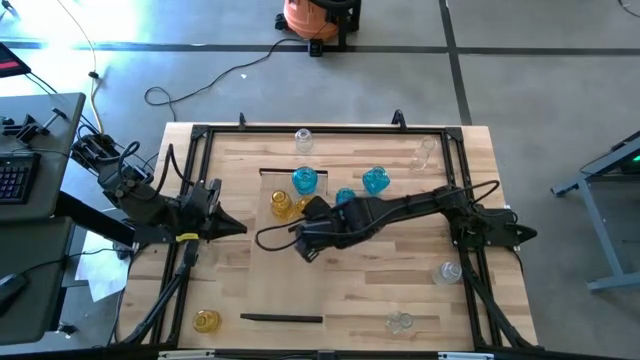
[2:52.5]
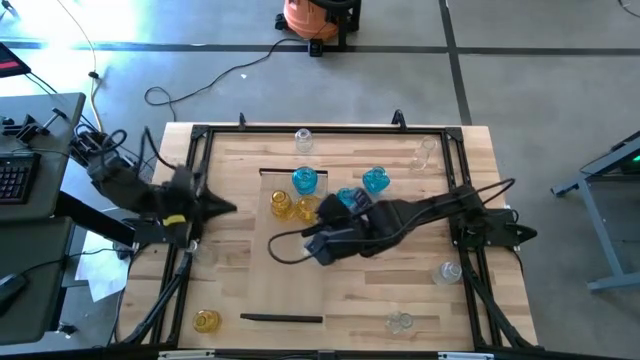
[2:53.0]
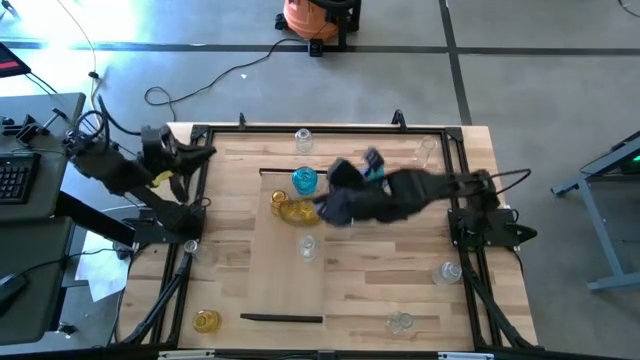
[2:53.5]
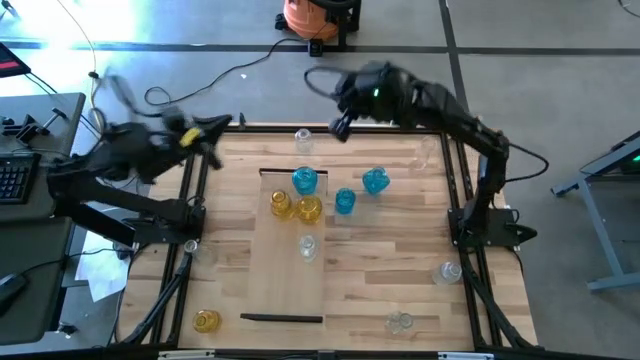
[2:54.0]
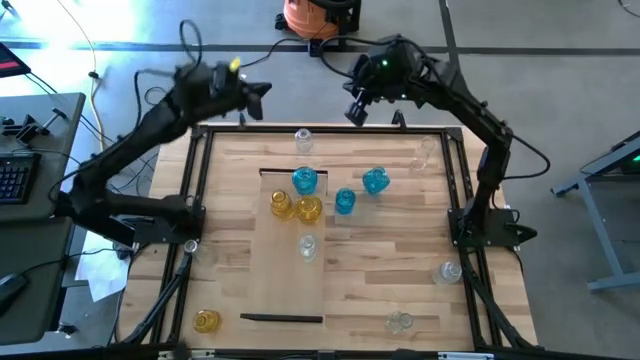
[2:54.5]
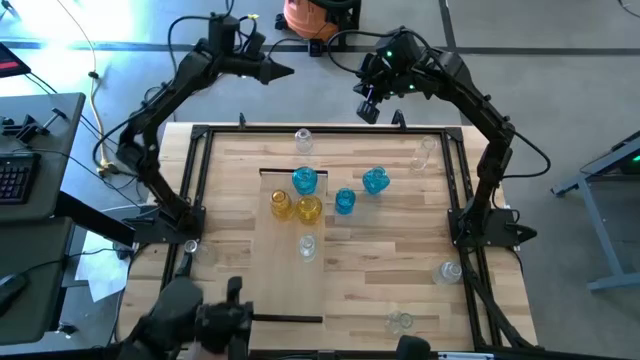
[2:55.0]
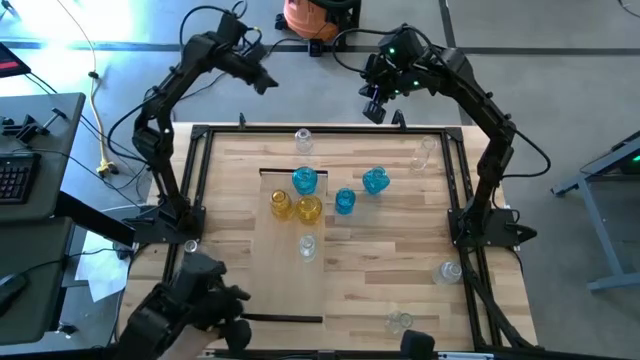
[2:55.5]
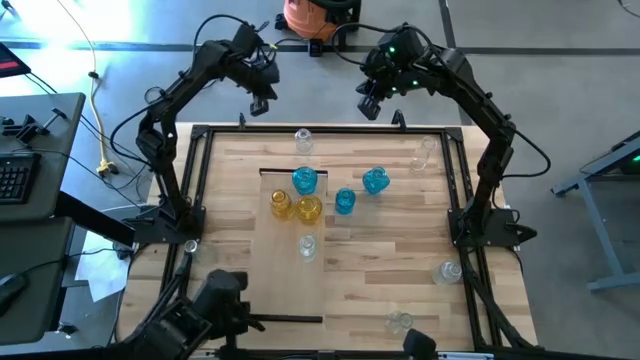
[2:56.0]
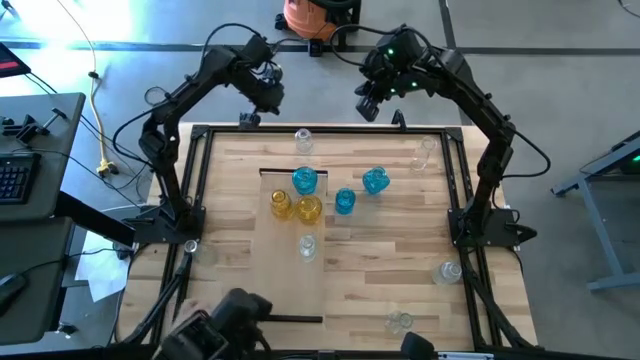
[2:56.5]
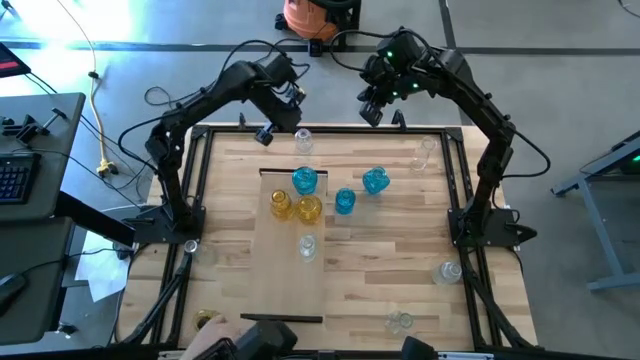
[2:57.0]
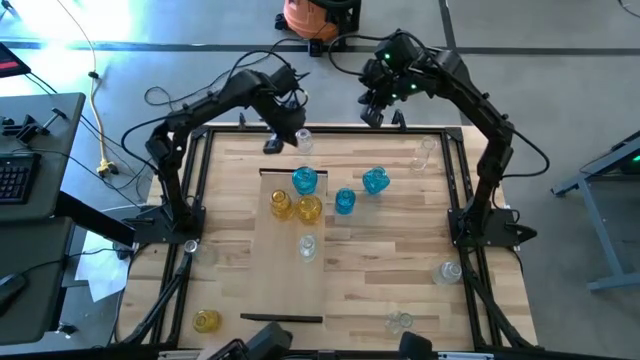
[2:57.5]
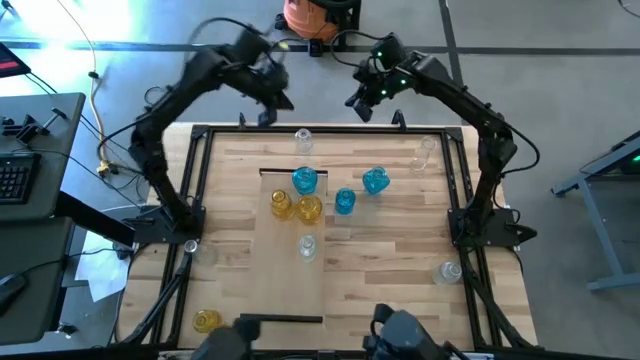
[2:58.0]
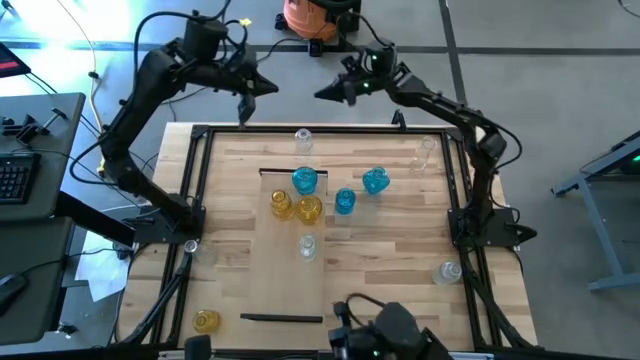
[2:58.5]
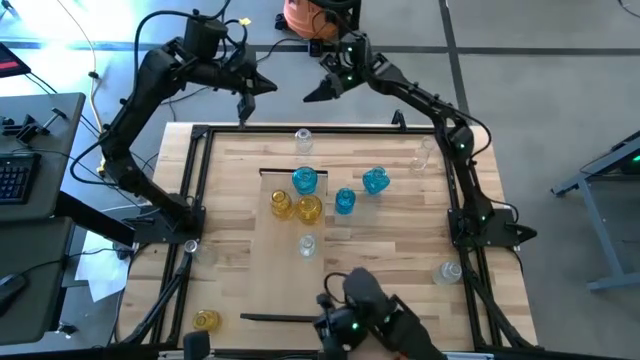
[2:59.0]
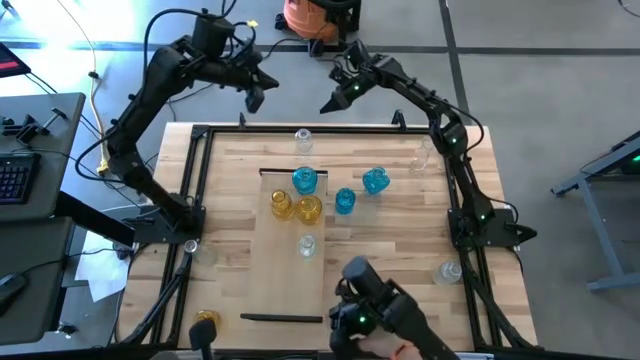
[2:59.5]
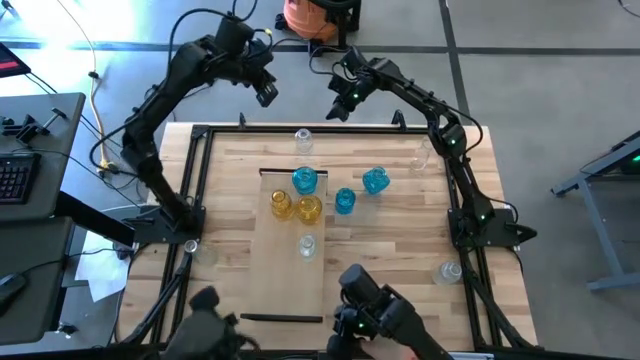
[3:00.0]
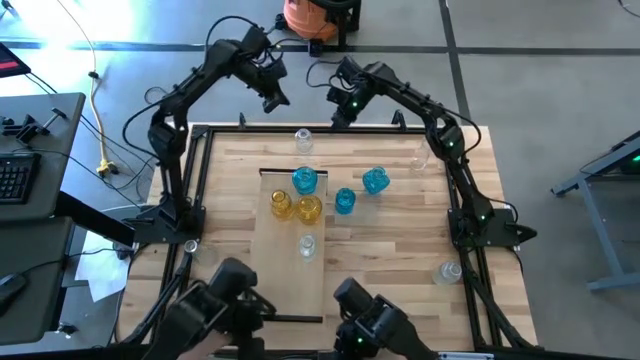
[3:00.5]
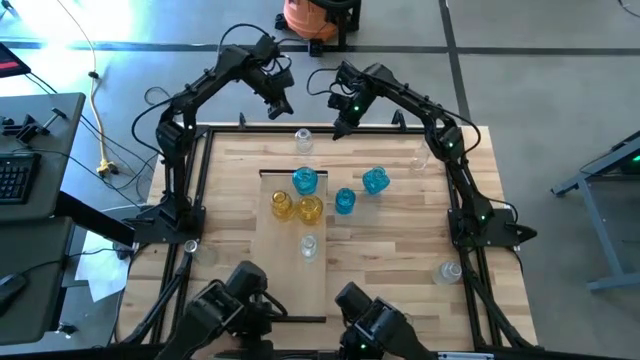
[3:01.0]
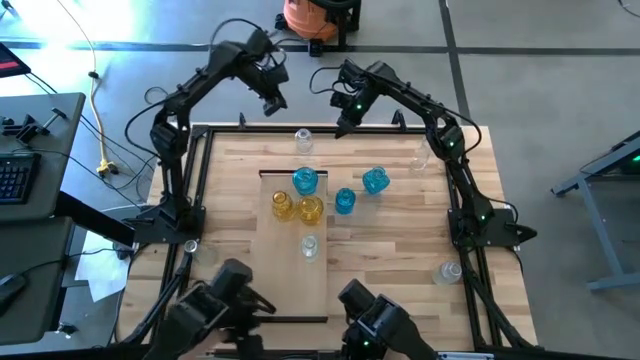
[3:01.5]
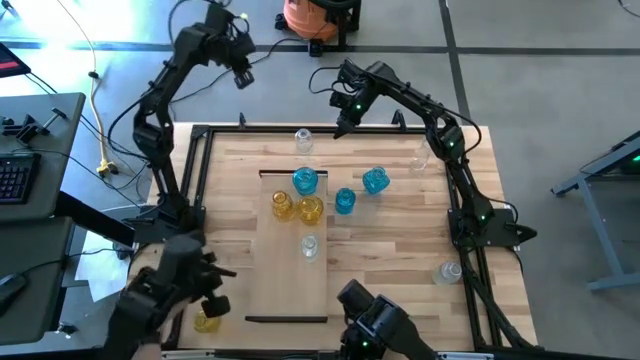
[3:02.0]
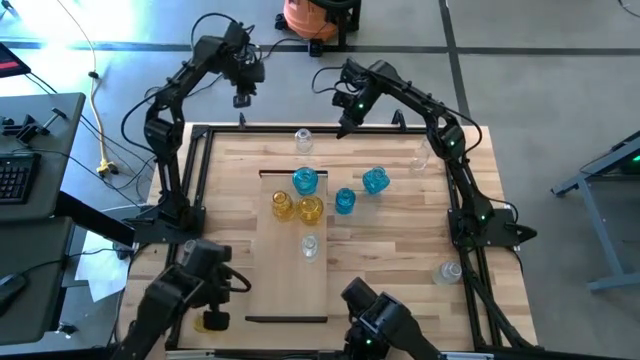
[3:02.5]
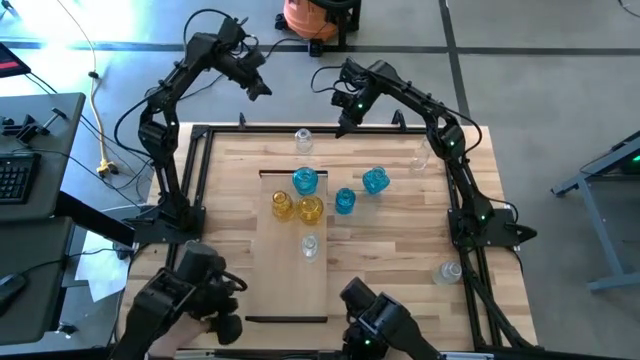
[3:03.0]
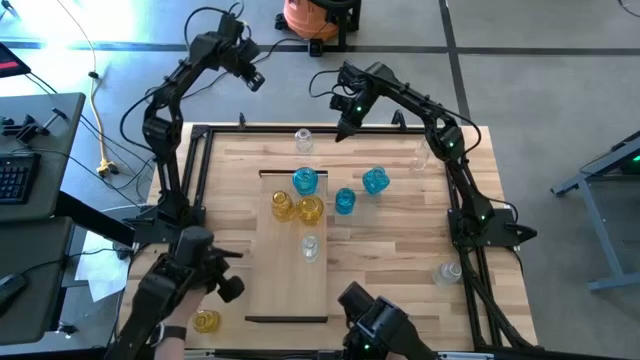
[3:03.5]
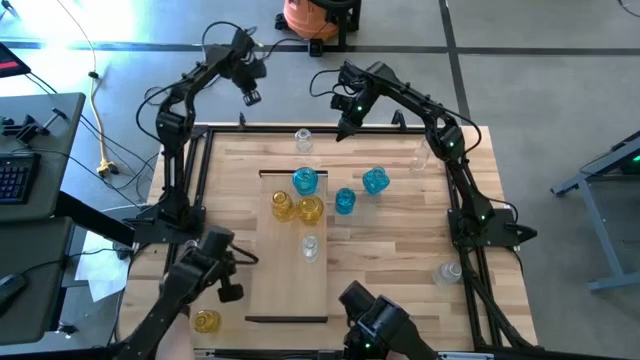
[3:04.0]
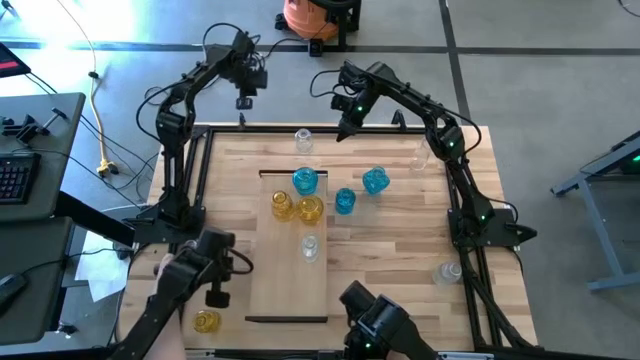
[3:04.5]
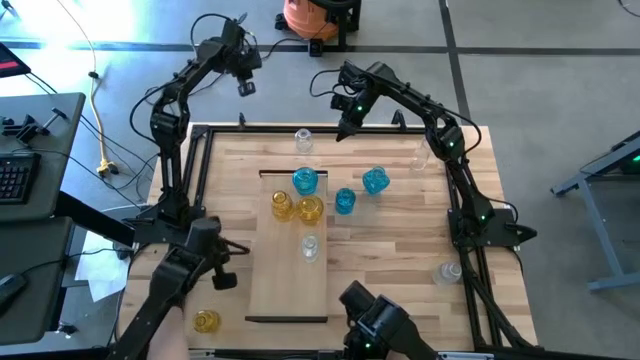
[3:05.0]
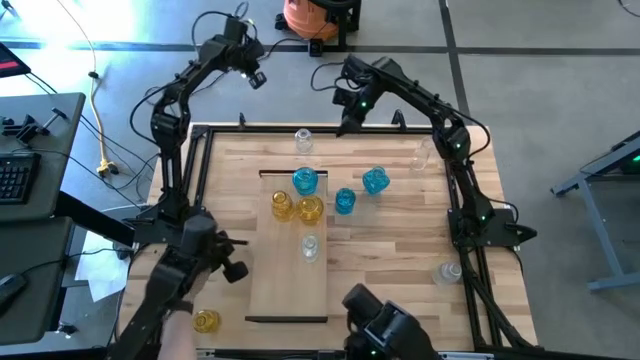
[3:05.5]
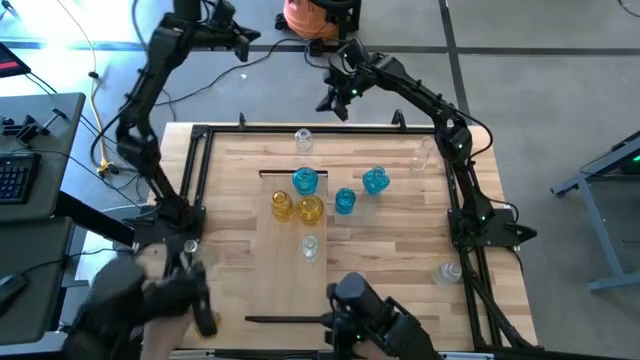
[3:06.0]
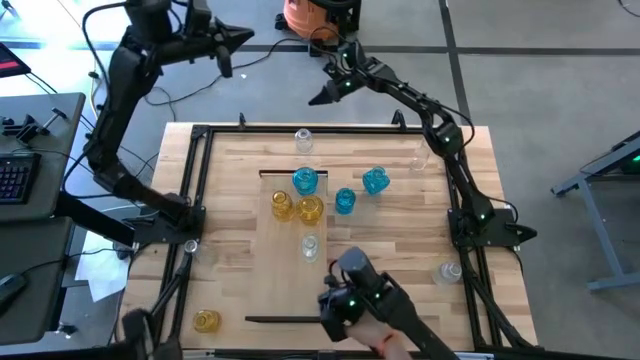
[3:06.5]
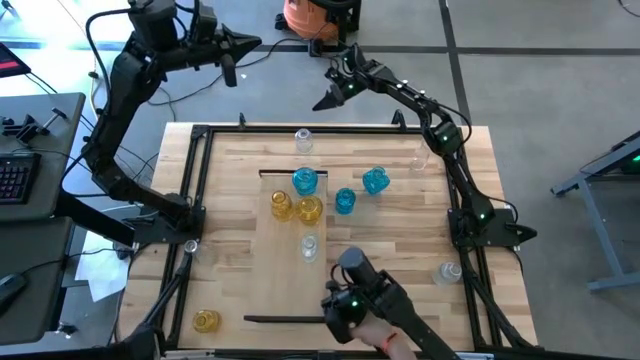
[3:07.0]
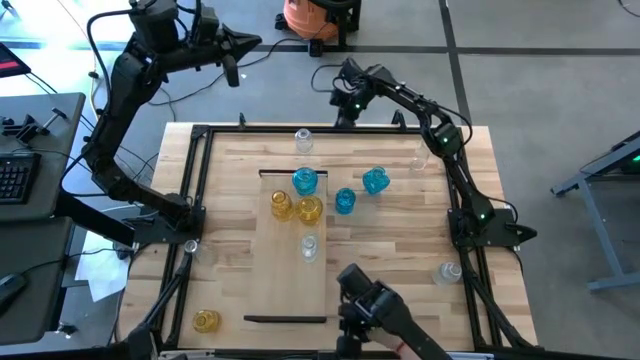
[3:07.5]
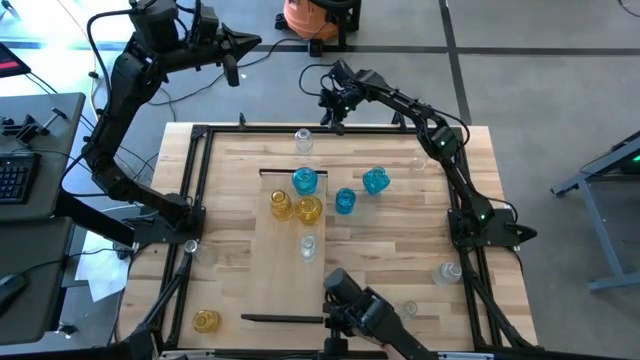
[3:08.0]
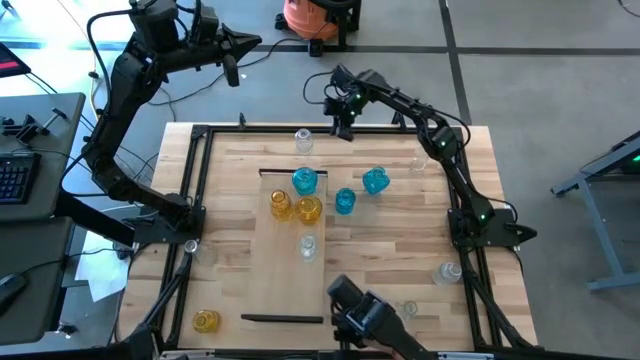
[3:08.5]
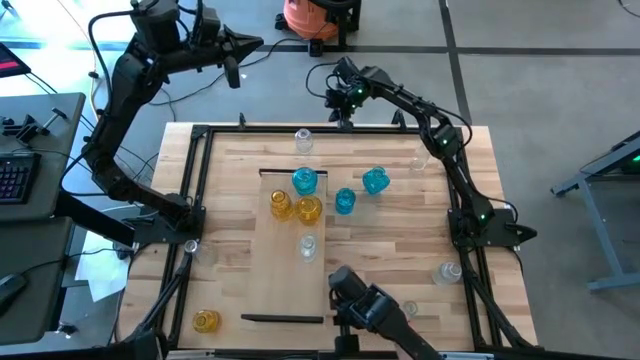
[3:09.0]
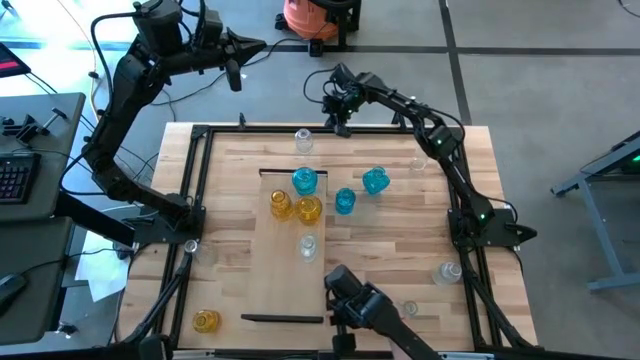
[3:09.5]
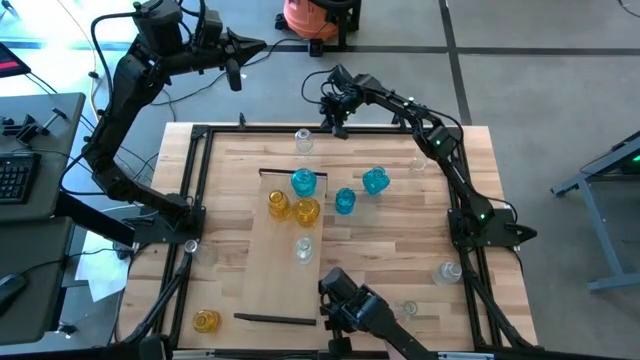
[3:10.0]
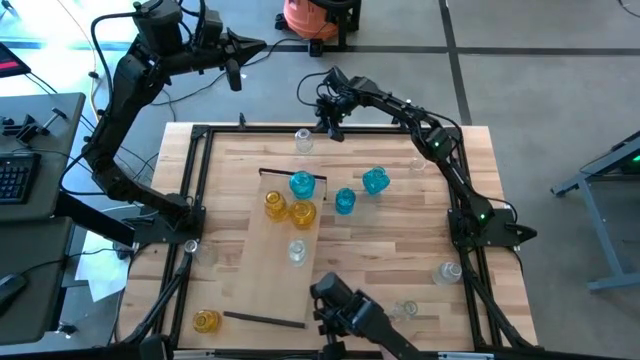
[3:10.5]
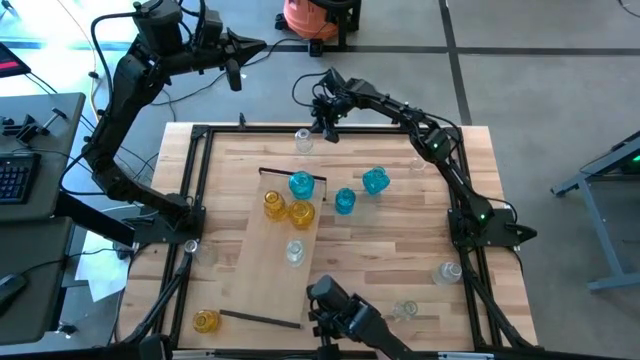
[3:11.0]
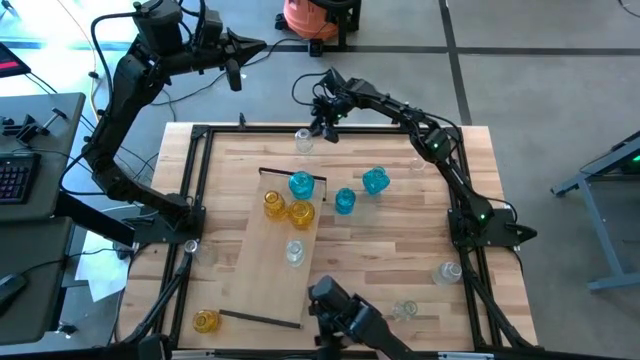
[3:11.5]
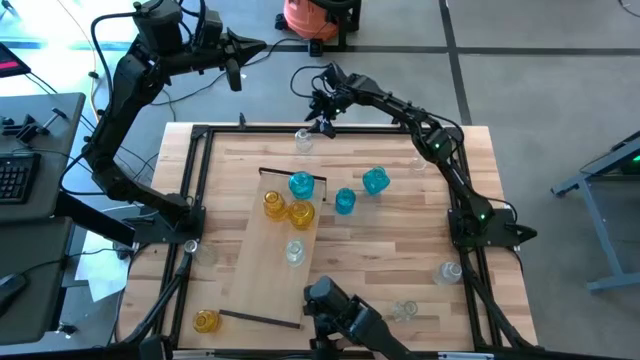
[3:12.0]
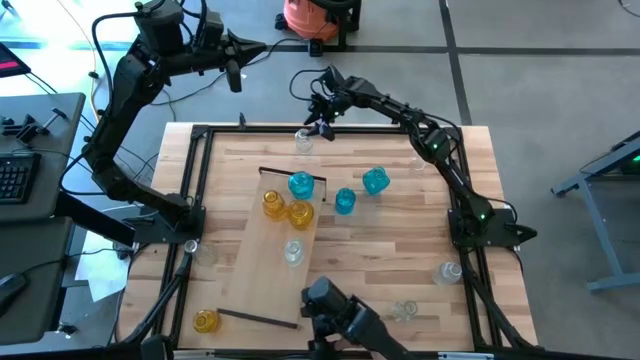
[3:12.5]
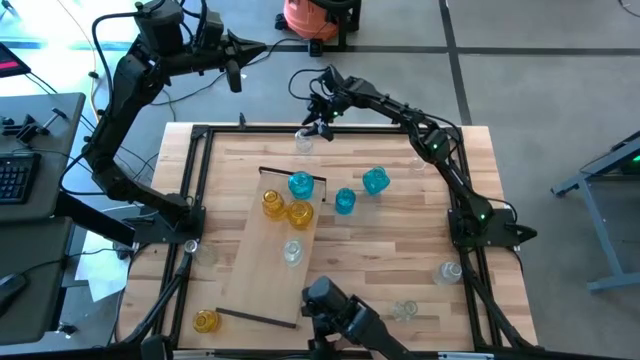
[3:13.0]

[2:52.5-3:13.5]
Task: sort vases onto shelf
Adjust the shelf on the table

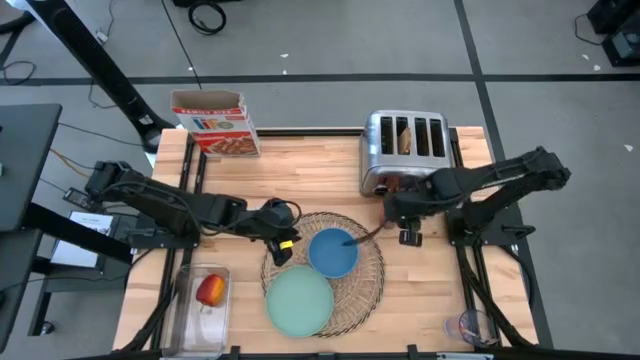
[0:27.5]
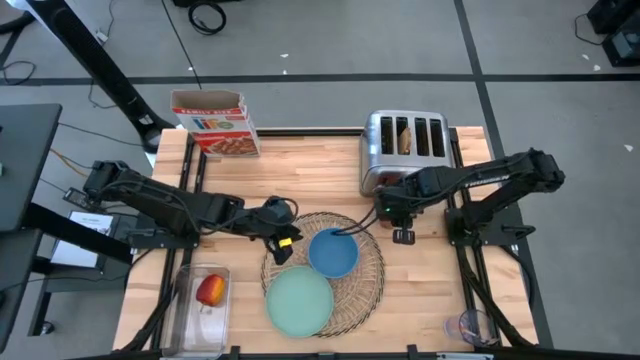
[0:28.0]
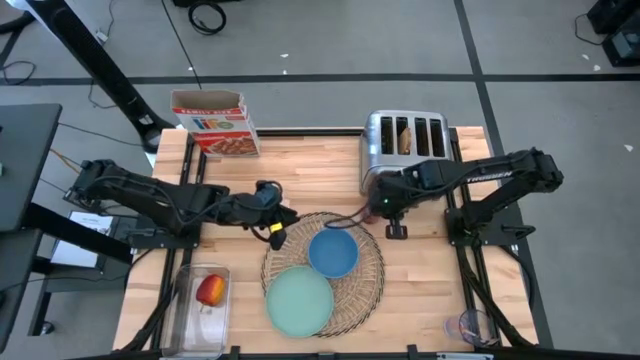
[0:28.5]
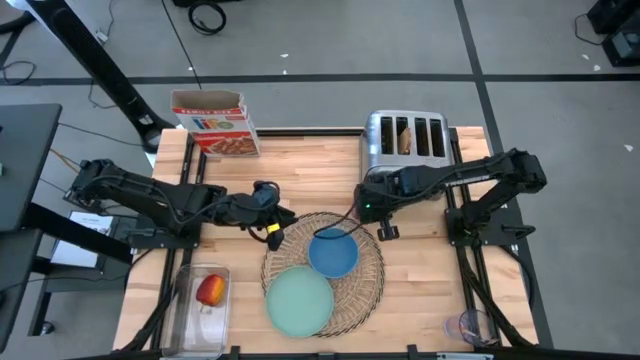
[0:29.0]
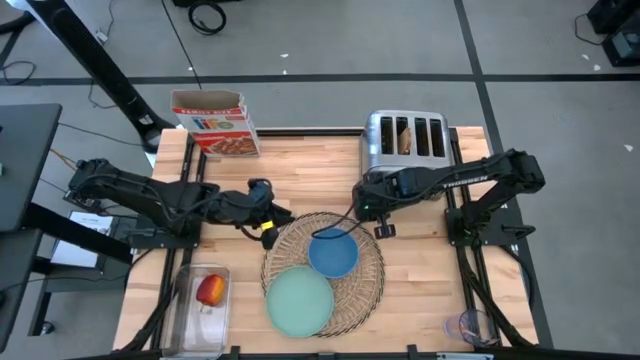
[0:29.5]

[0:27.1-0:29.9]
Task: Arrange a breakfast setting
Move the pink glass of milk to the top right of the table
